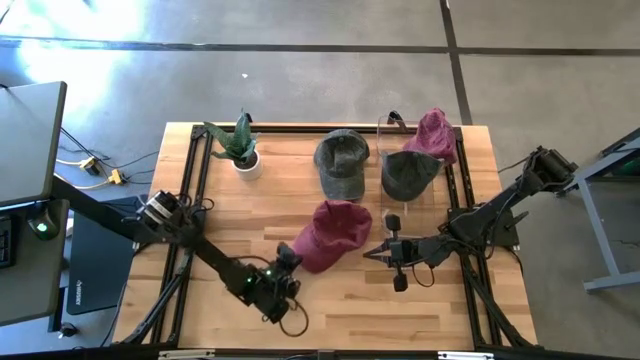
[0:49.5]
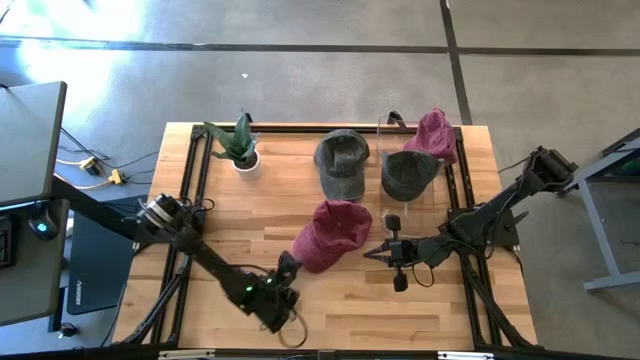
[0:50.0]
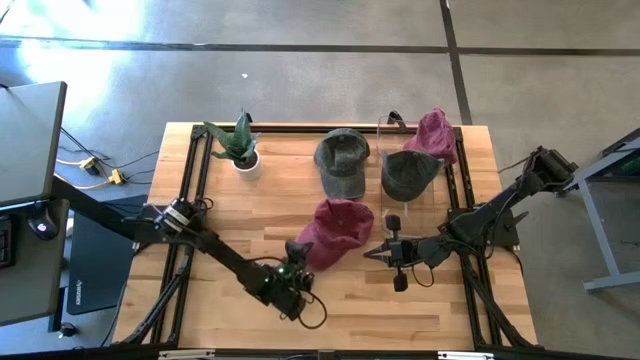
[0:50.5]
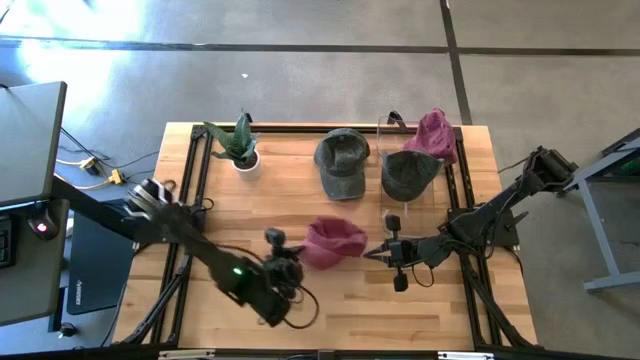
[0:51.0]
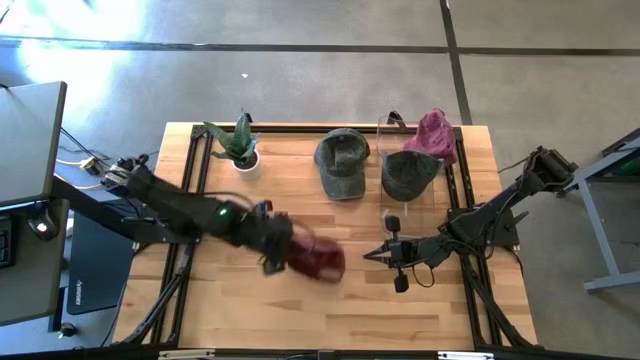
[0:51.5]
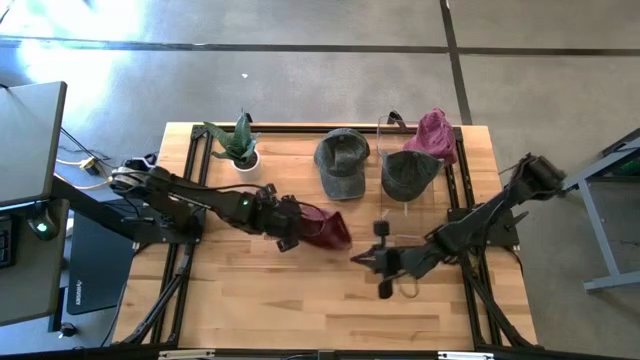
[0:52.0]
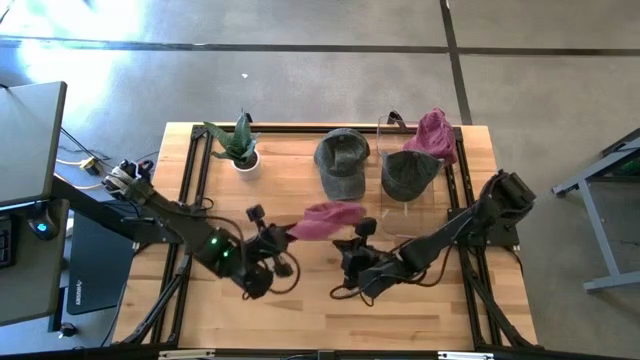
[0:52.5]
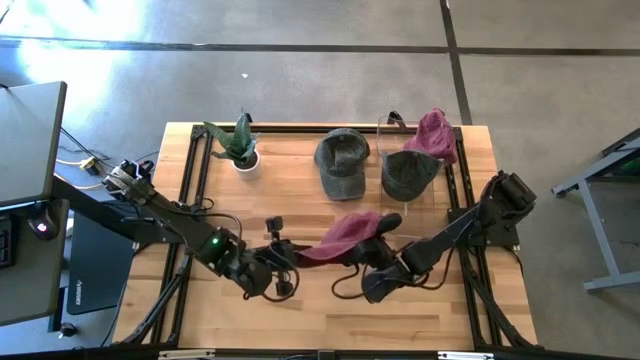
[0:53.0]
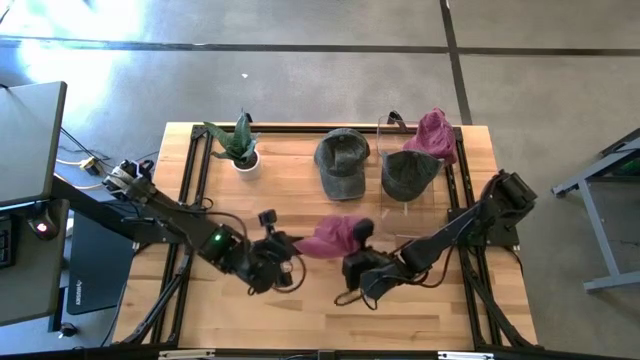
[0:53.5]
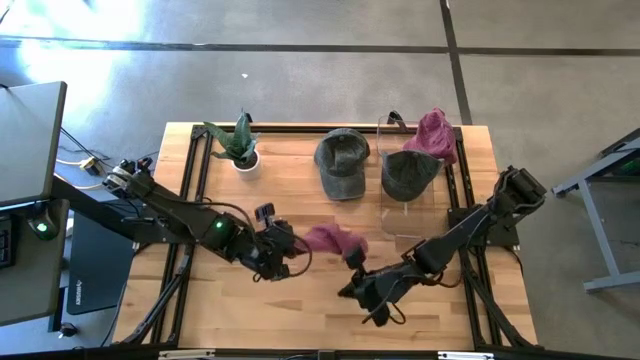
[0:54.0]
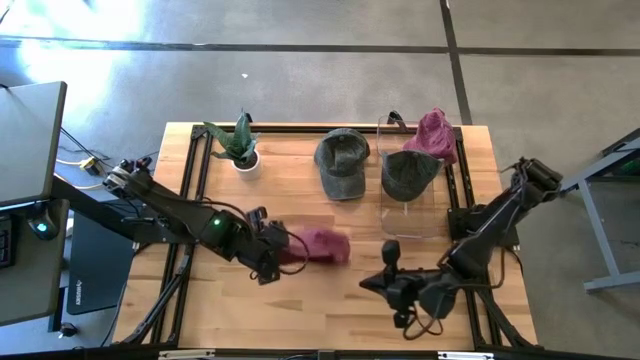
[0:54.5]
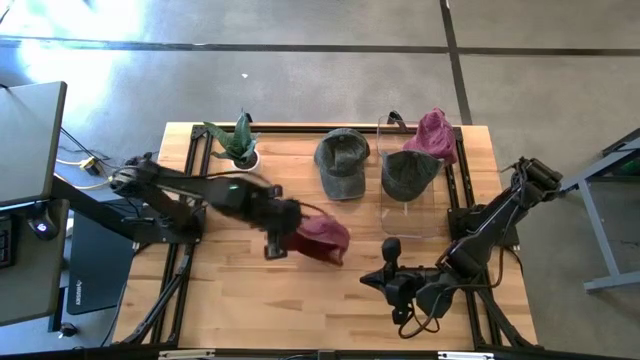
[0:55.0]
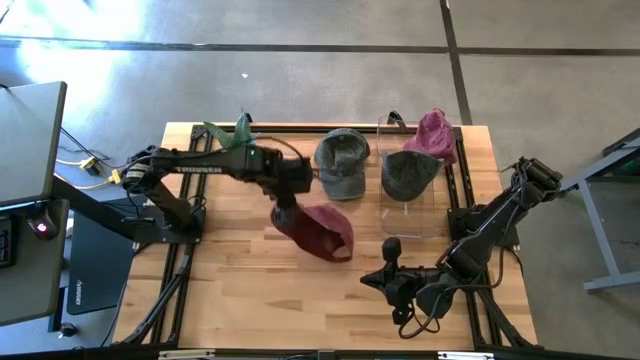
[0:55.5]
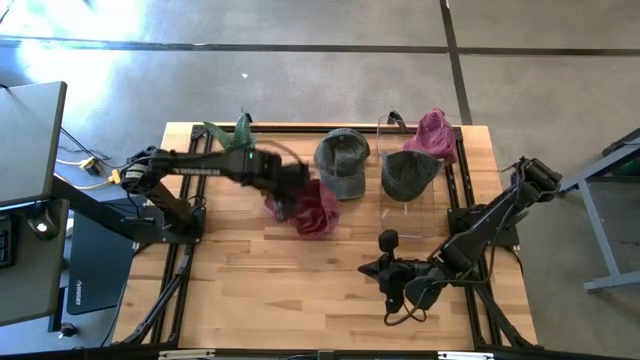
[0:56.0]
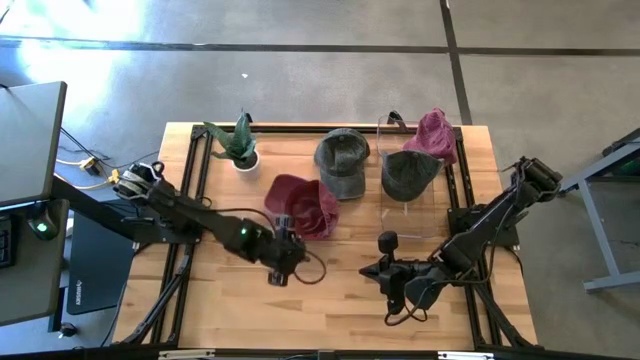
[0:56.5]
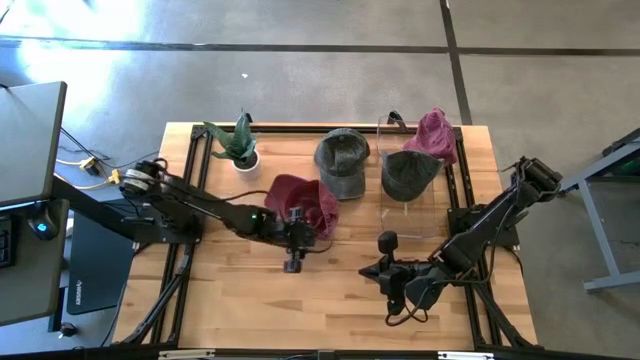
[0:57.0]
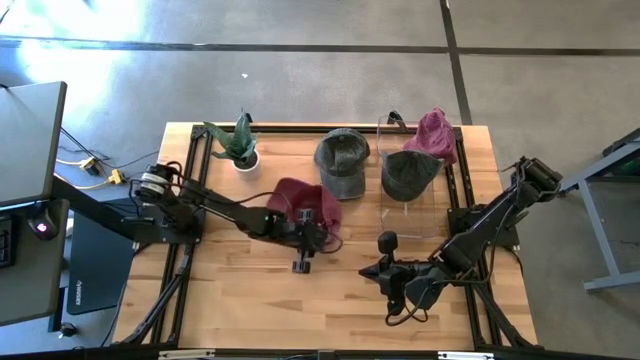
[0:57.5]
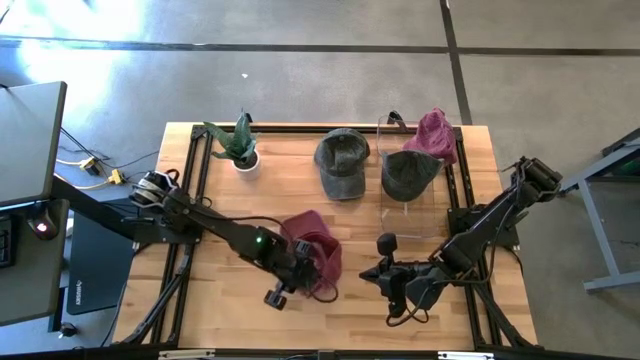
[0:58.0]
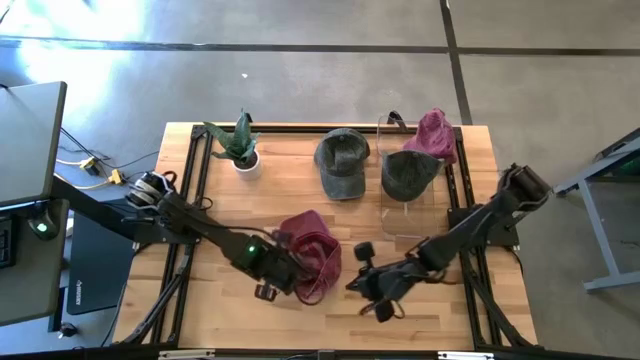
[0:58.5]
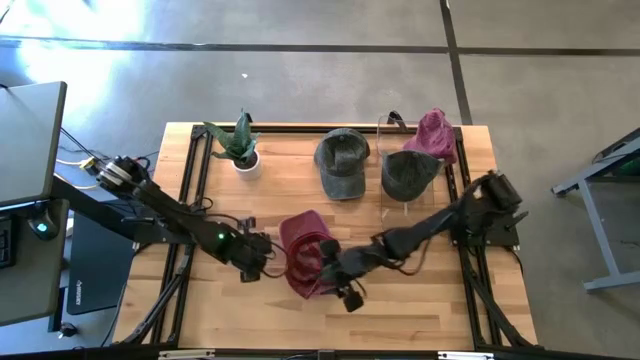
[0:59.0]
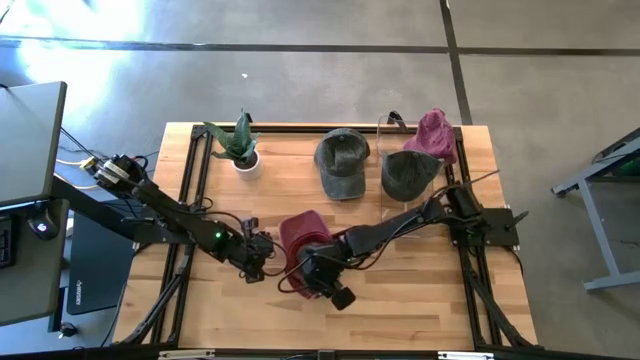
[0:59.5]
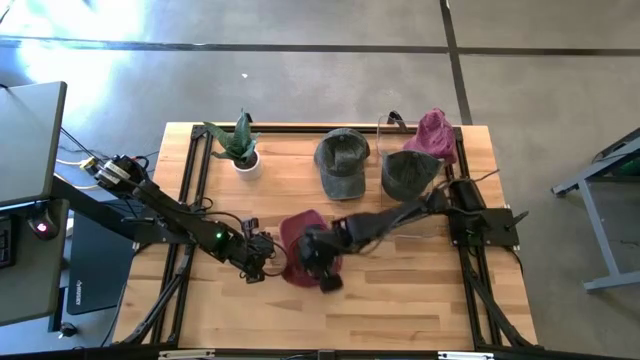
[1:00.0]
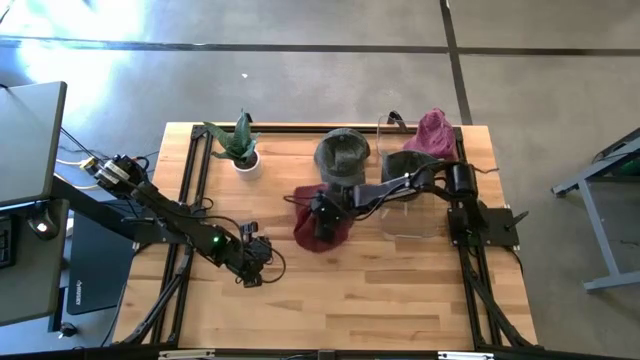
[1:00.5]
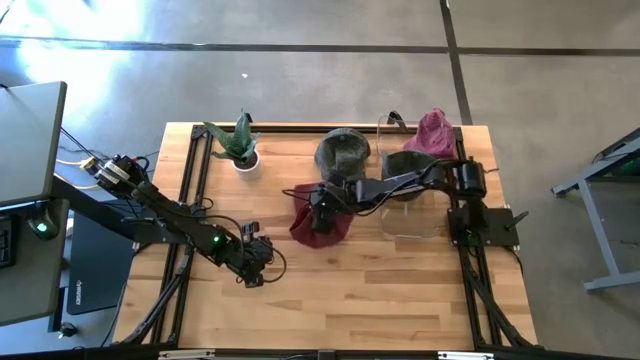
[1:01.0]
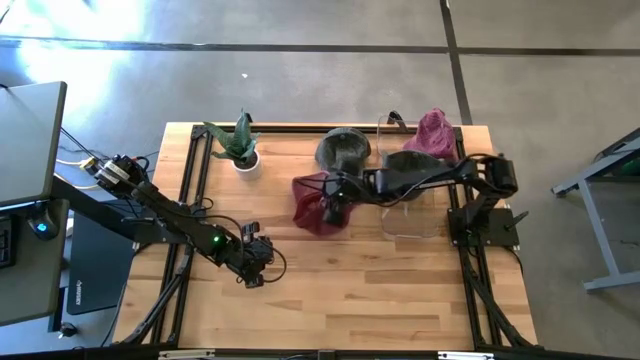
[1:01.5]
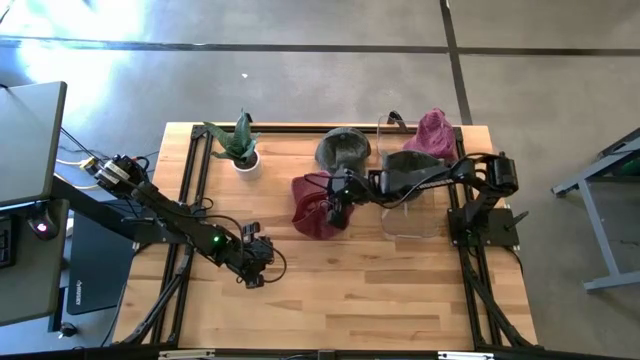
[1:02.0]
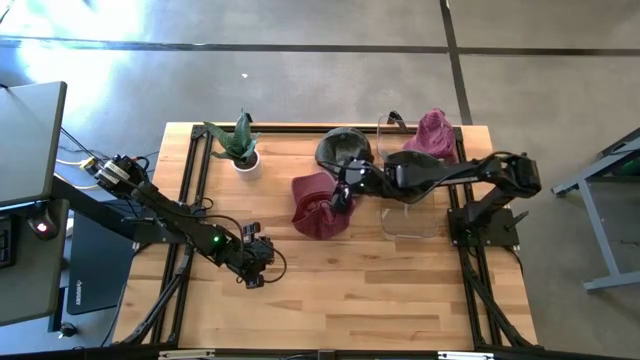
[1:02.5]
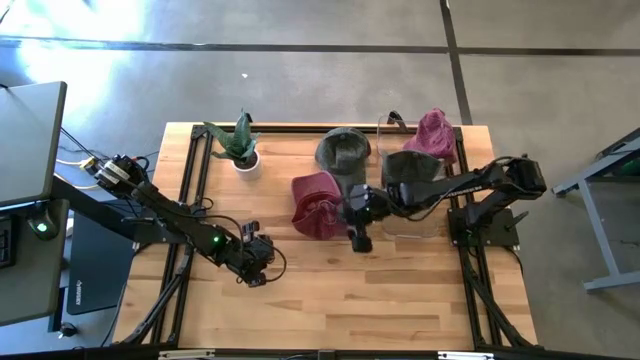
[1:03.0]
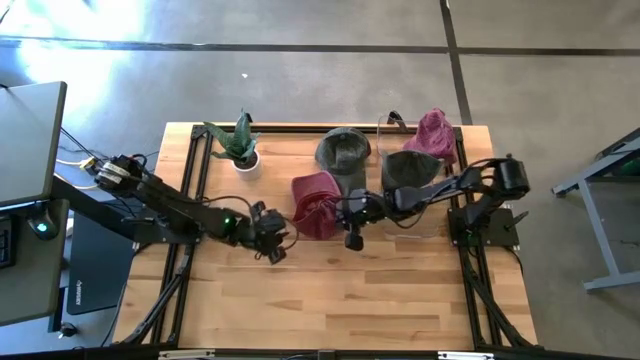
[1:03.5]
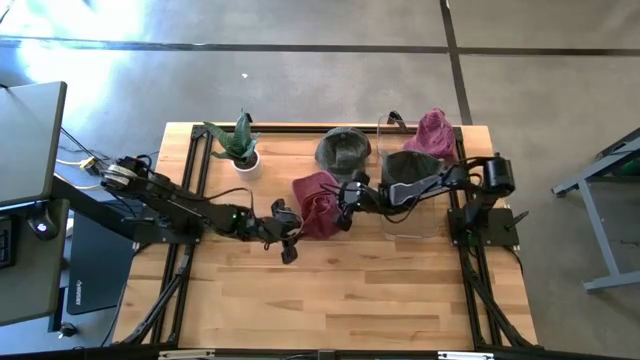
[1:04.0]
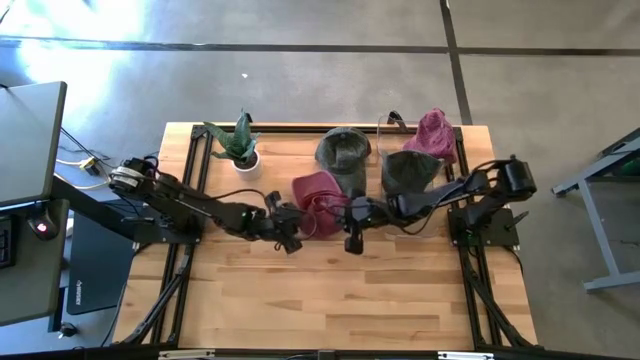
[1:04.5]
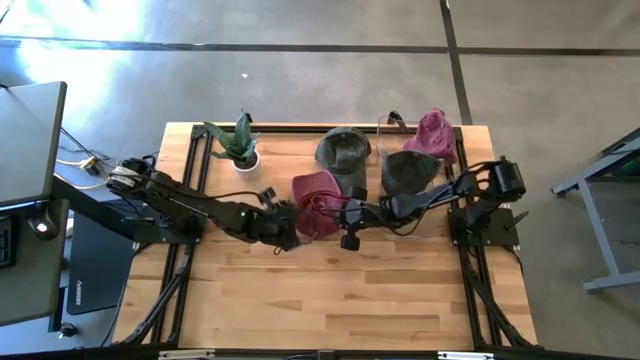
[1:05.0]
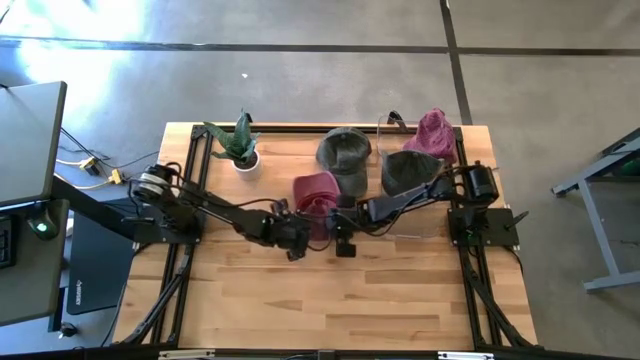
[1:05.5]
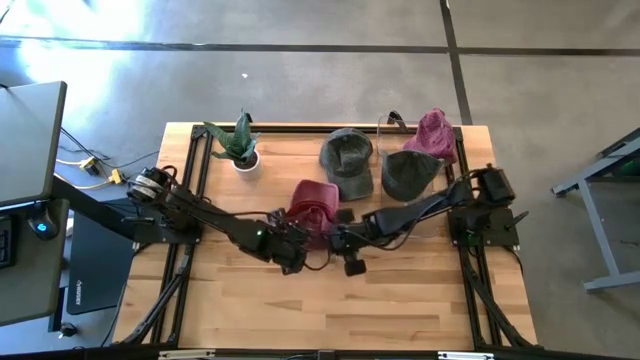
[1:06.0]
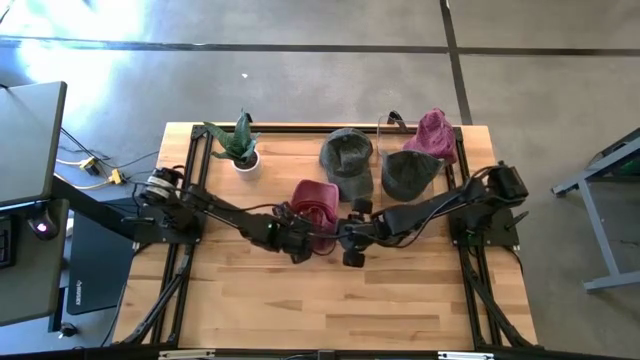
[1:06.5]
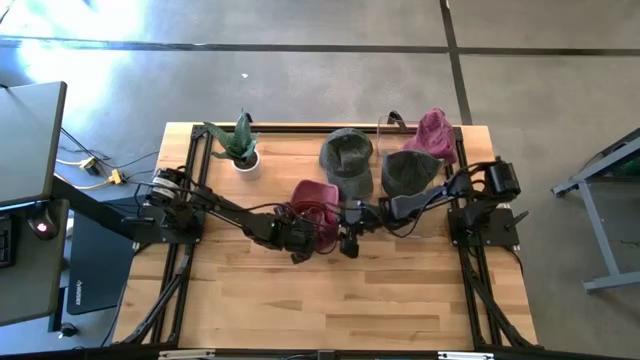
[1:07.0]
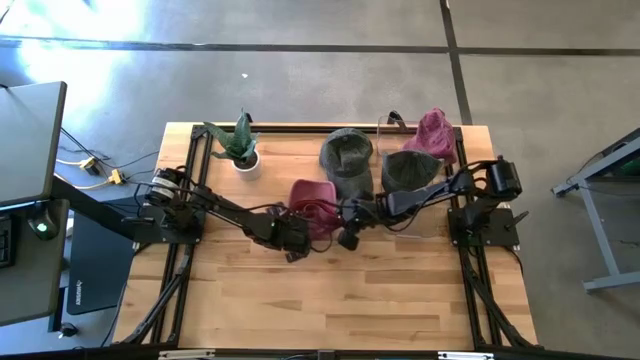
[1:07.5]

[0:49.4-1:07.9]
Task: Pick & Place hat
Put the red cap into the top transparent bin

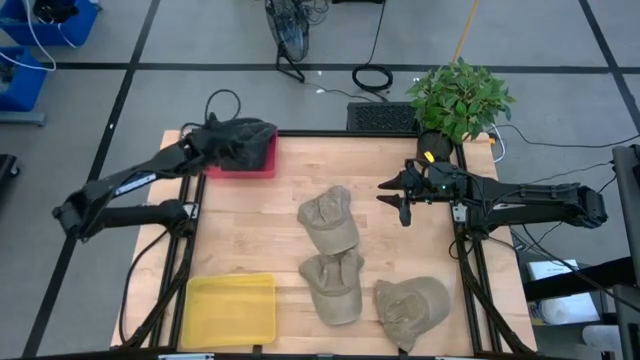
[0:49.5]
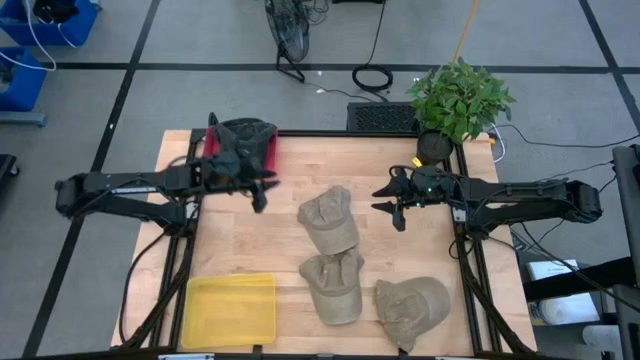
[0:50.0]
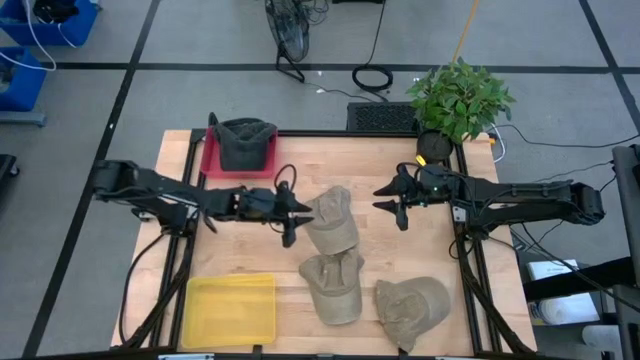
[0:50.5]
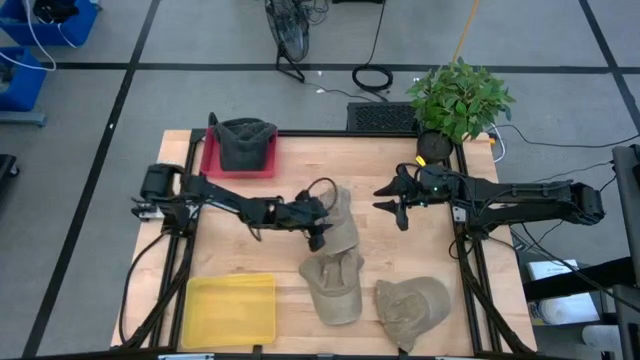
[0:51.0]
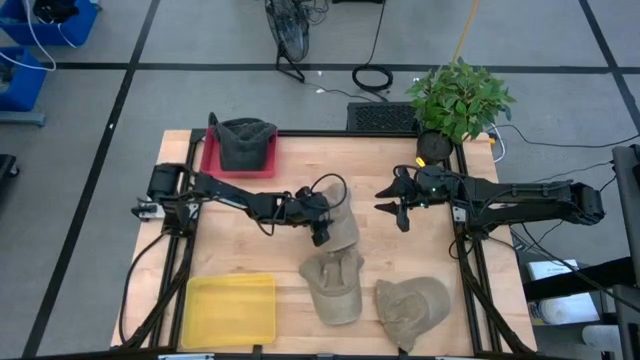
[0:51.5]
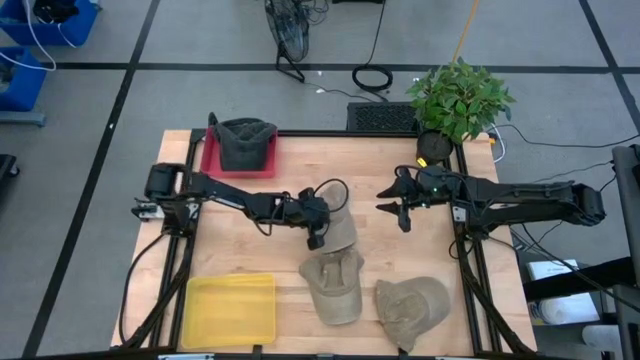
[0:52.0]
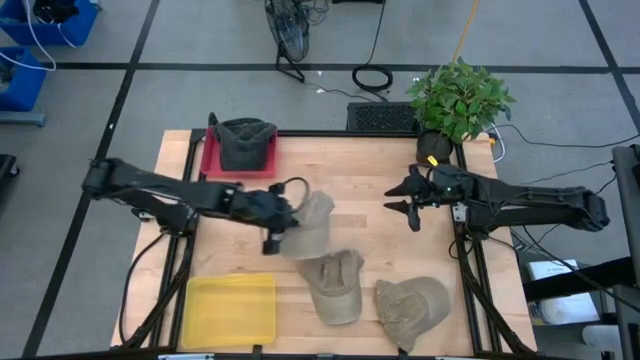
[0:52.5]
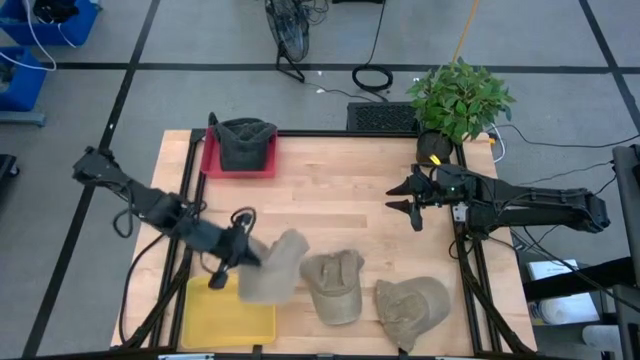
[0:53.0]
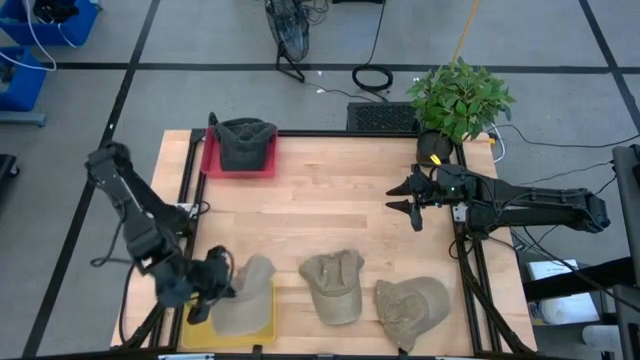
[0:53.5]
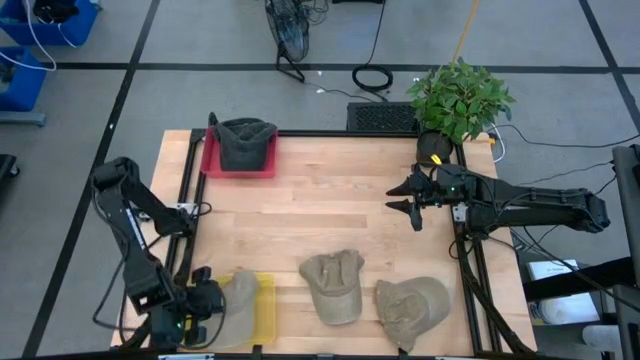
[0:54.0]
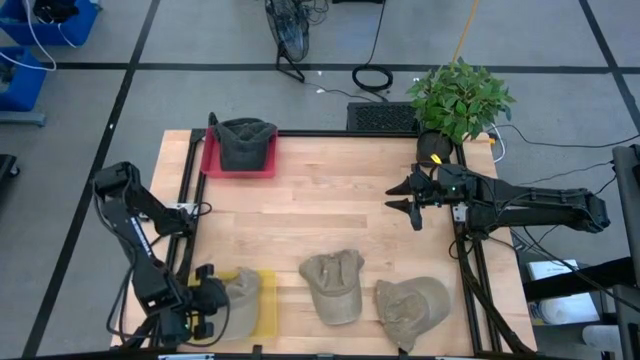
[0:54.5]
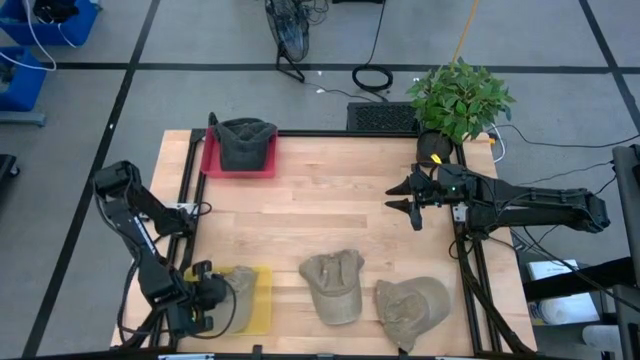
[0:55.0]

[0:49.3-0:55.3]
Task: Pick & Place hat
Put the top left brown cap into the yellow bin
